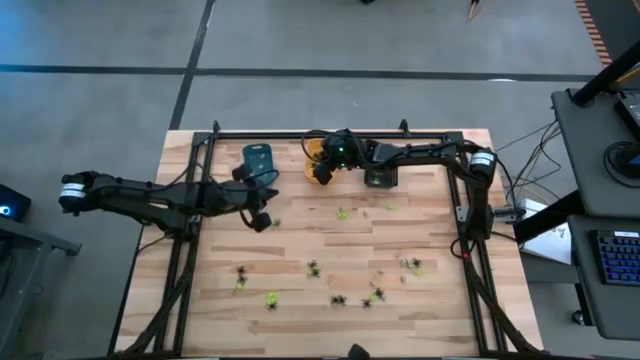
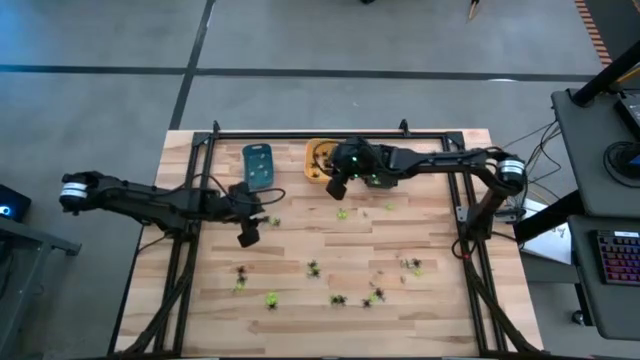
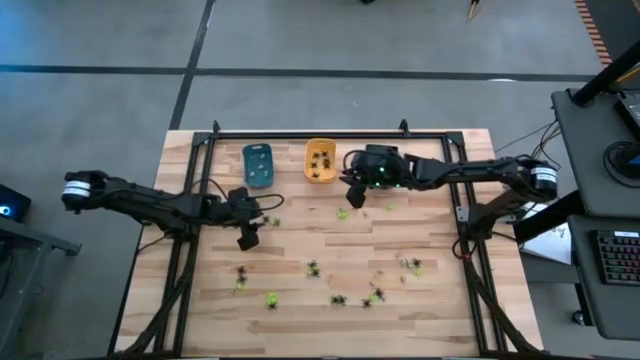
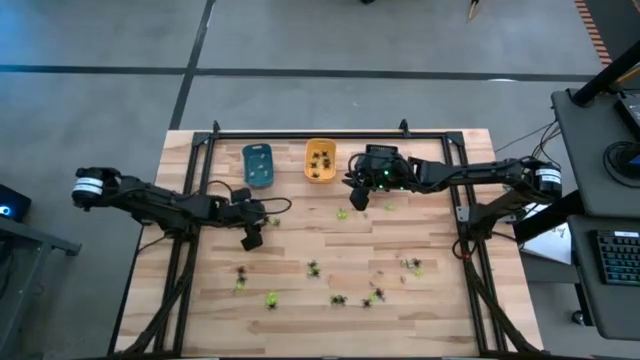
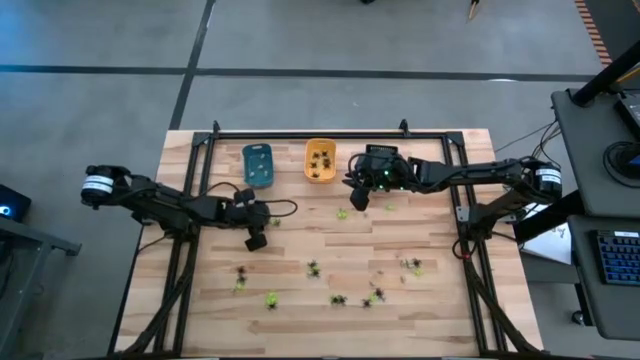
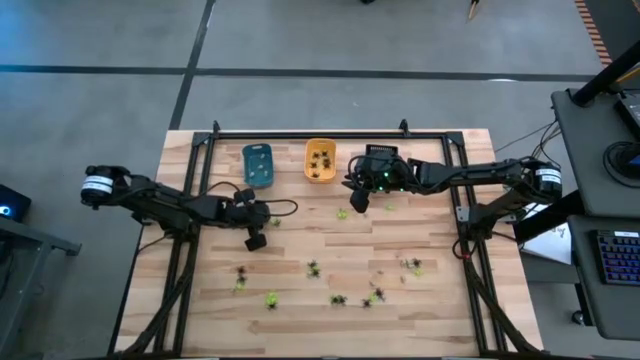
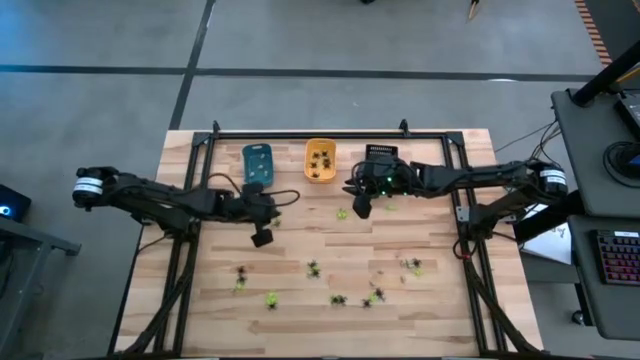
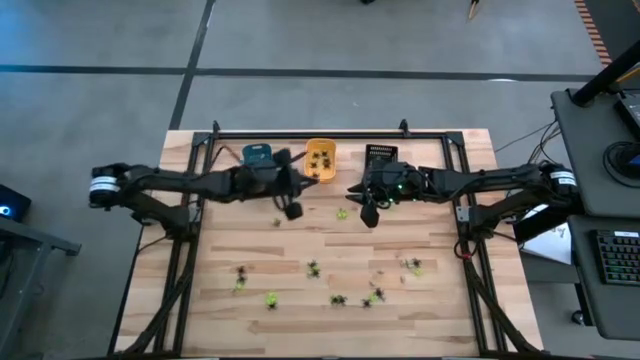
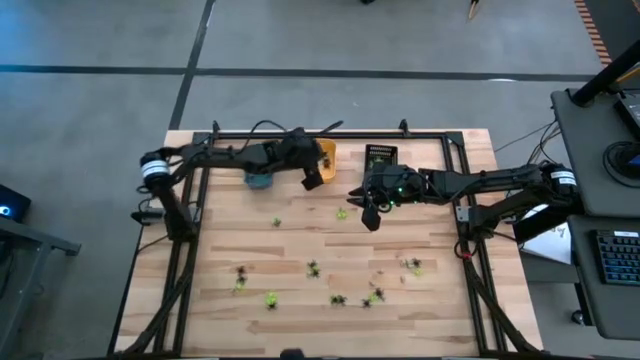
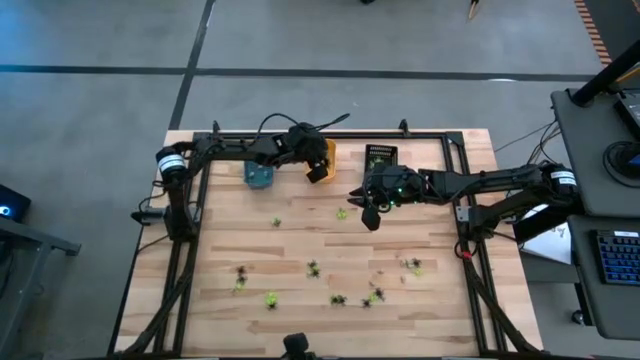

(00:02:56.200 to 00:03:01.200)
Task: Sort Halloween decoration
Put the black spider toy into the orange bin

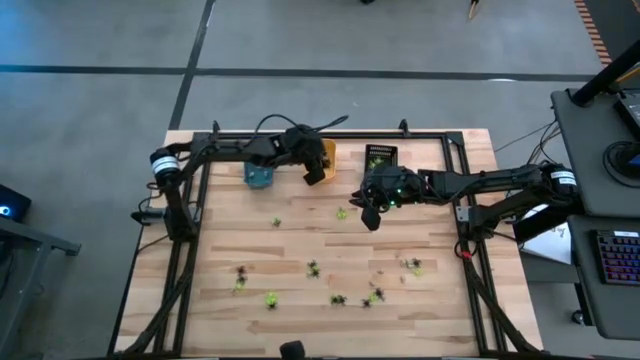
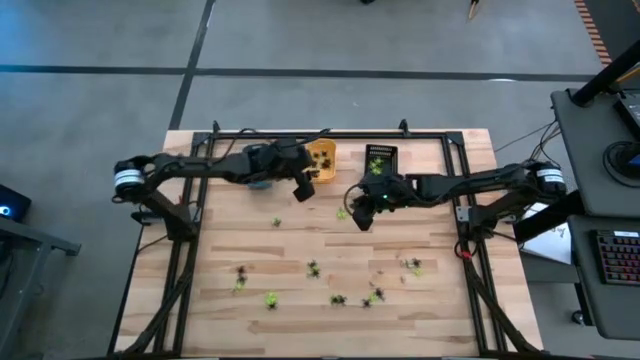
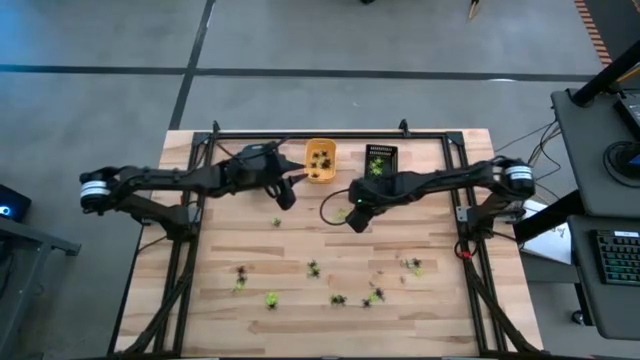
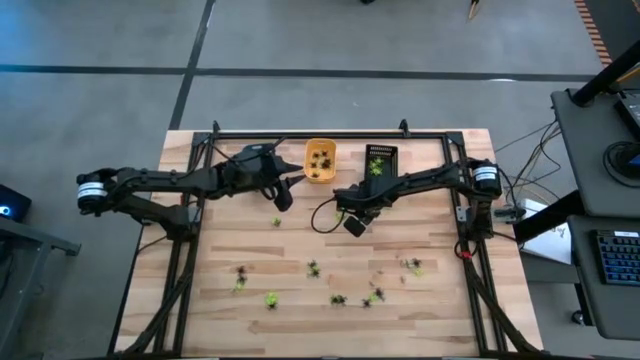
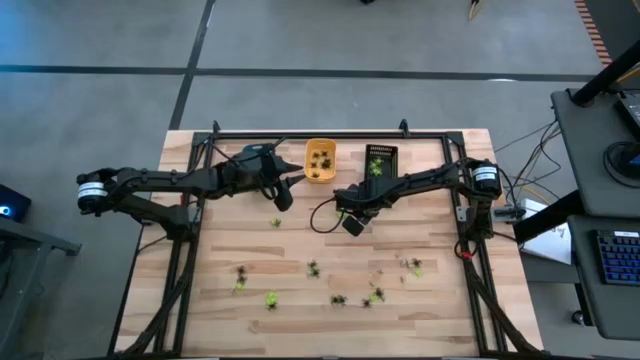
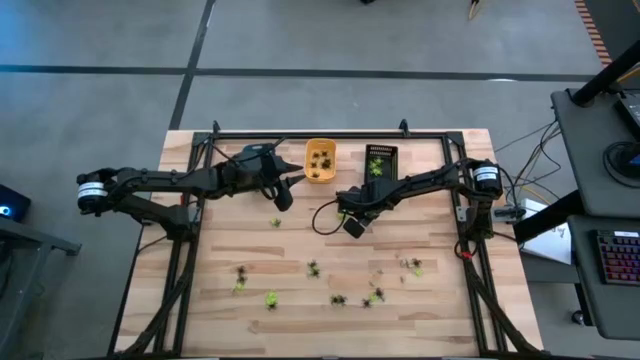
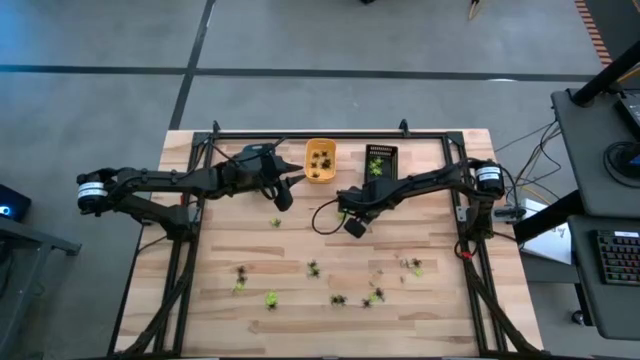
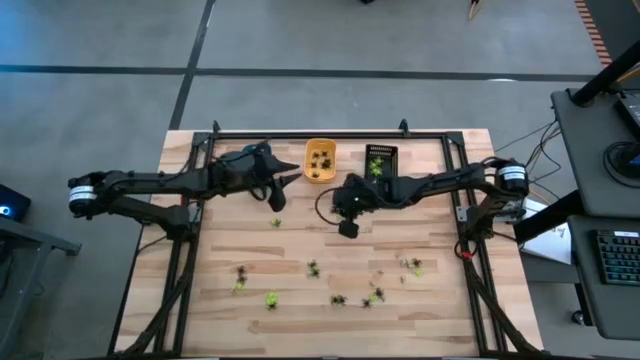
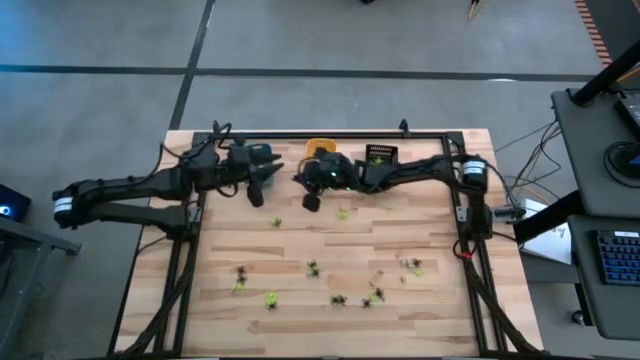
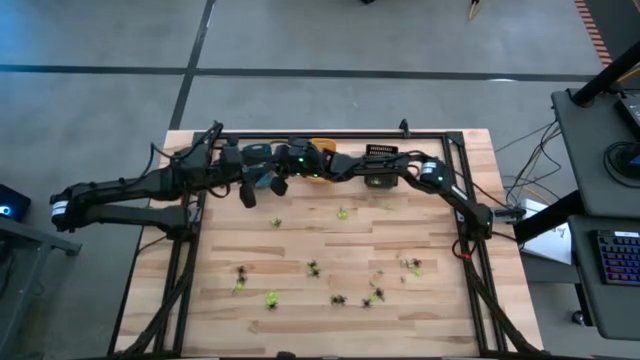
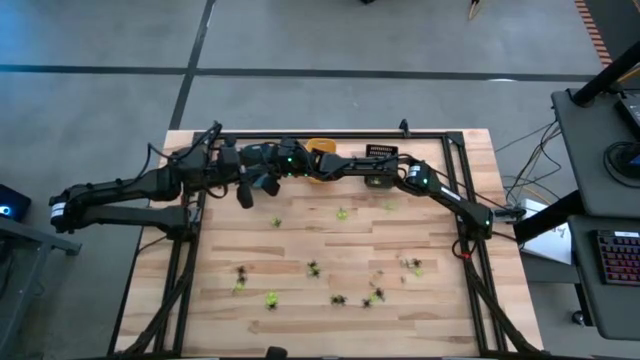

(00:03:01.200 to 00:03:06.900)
Put the white skull toy into the blue bin

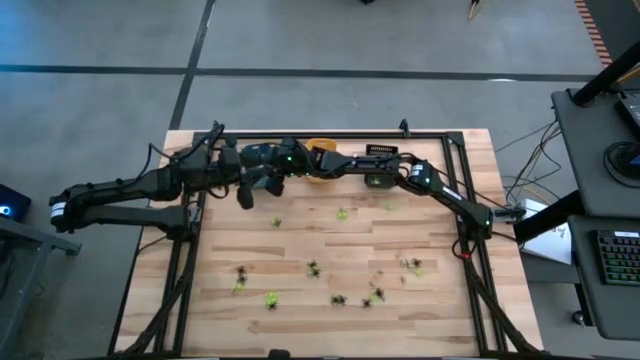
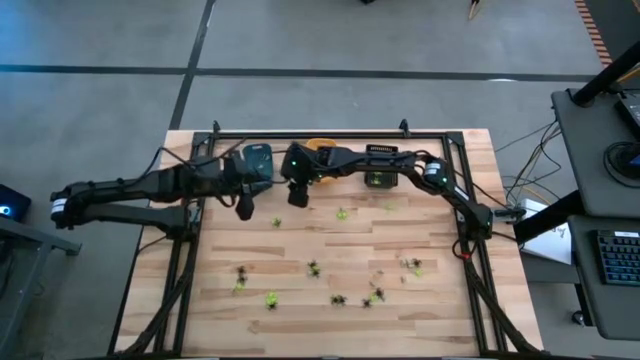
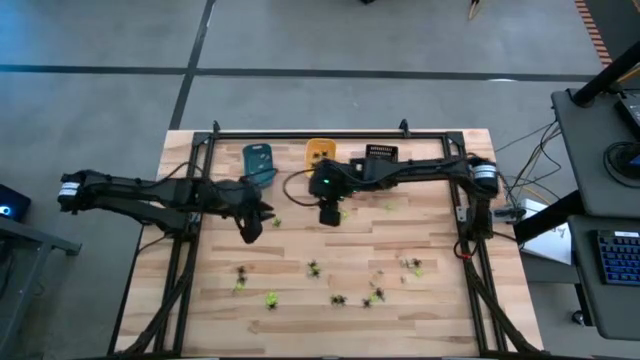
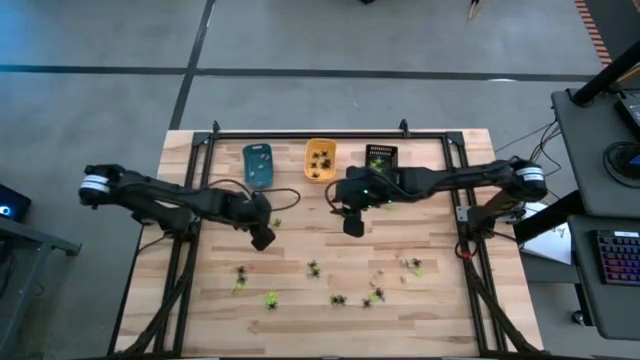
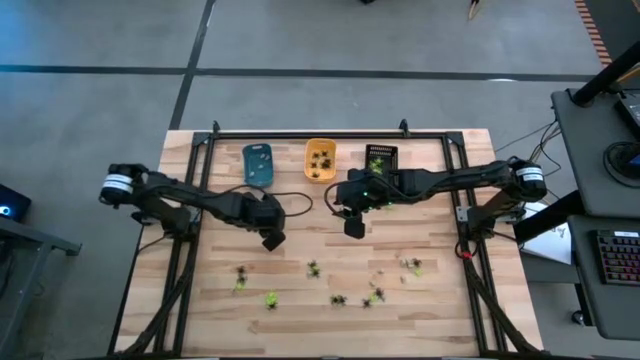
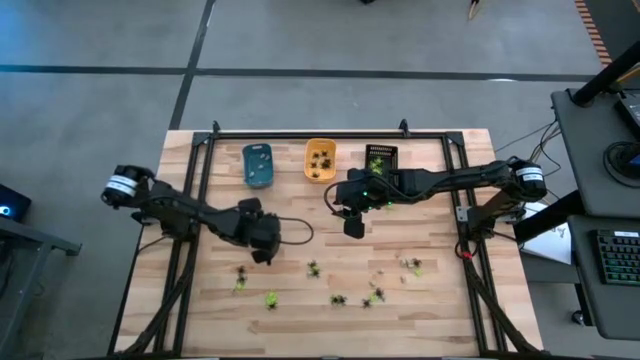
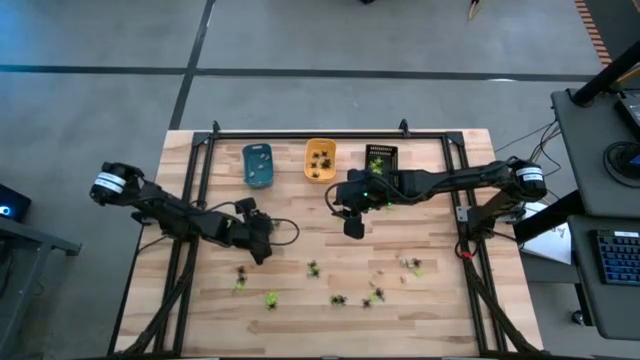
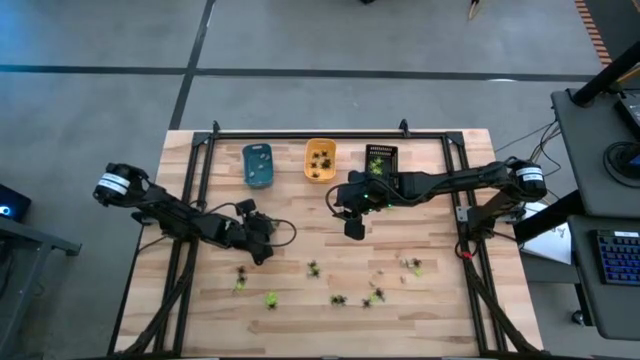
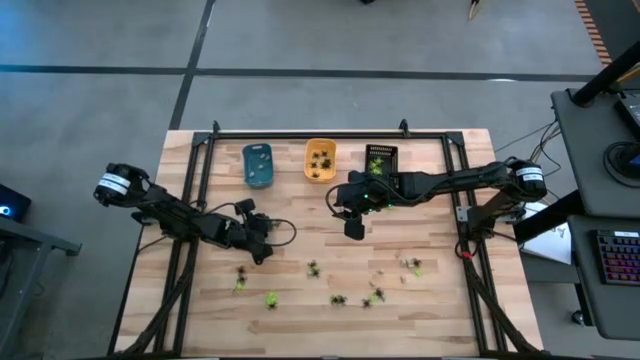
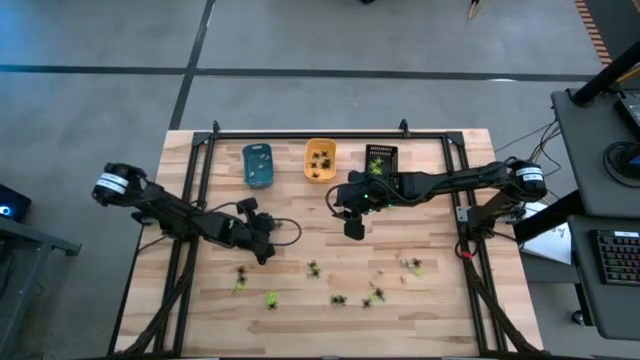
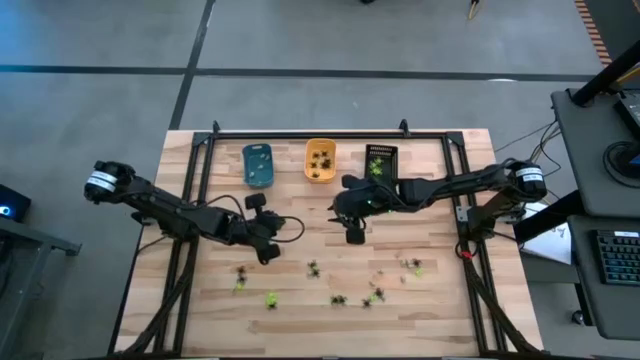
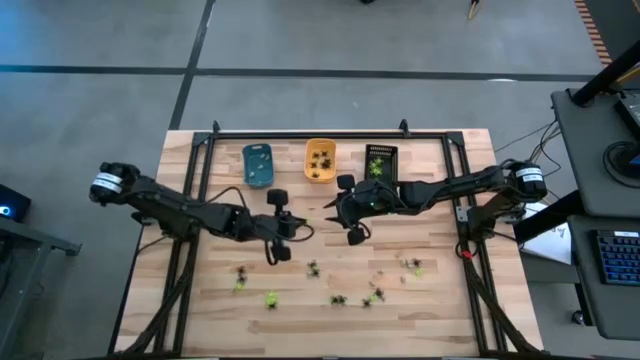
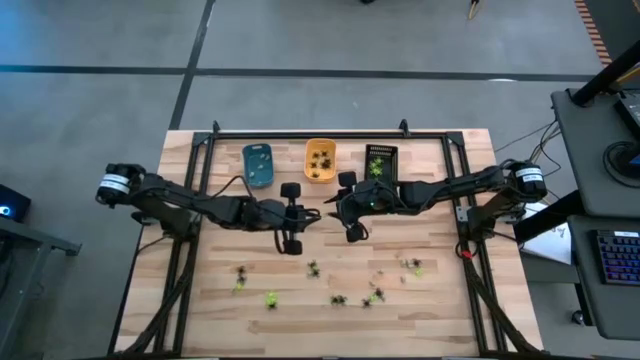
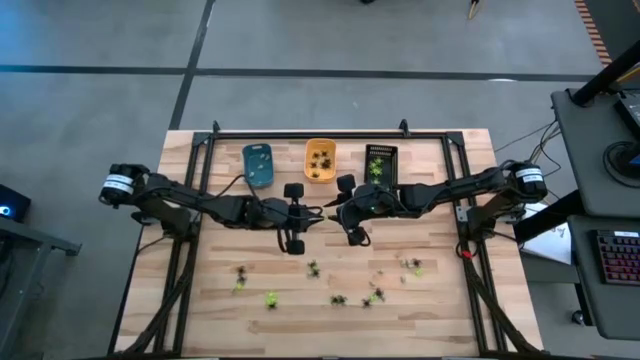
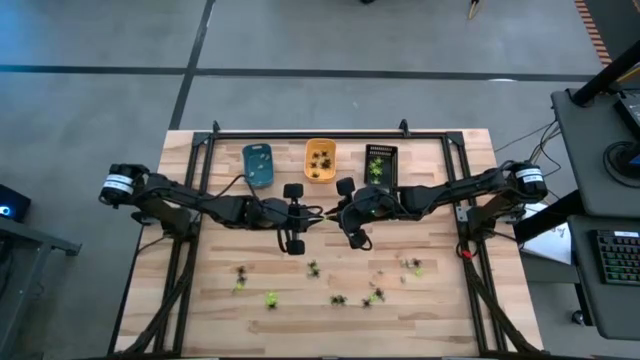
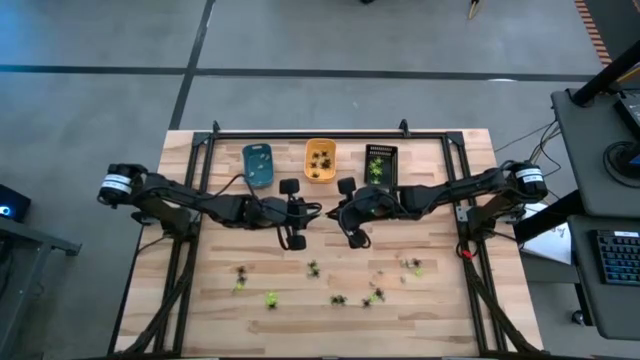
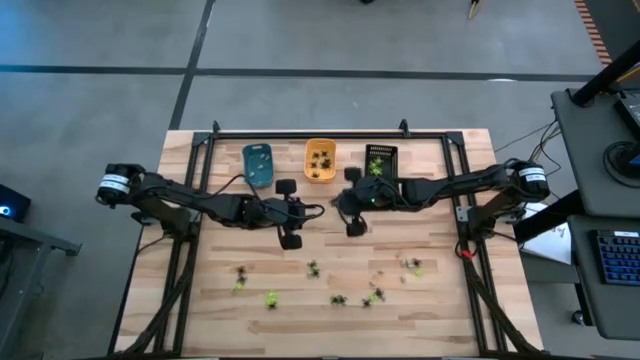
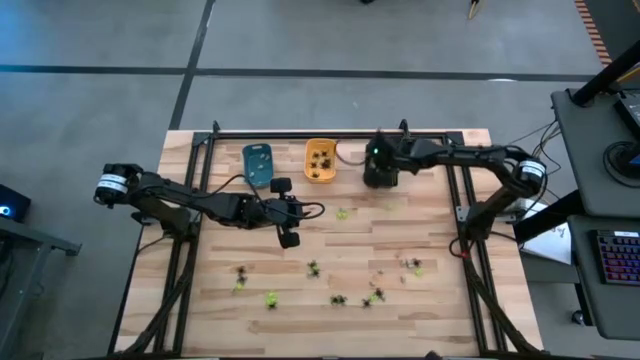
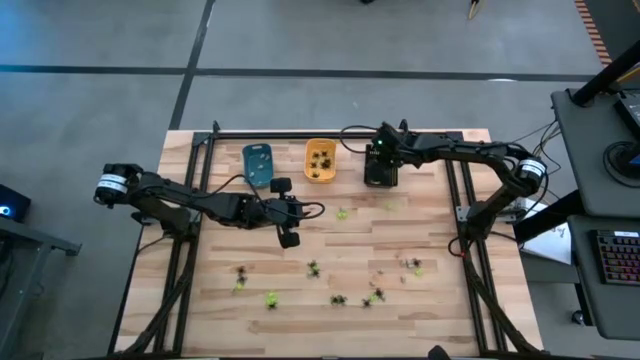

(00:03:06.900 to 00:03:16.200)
Put the green spider toy into the black bin
